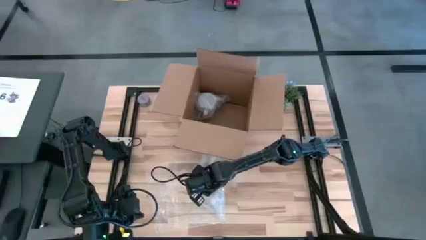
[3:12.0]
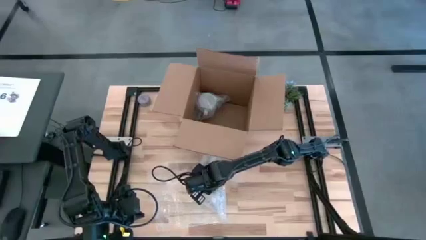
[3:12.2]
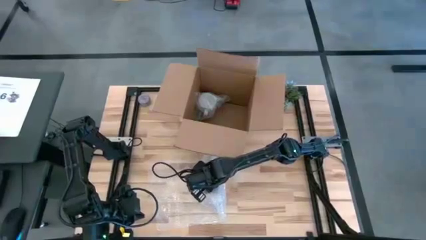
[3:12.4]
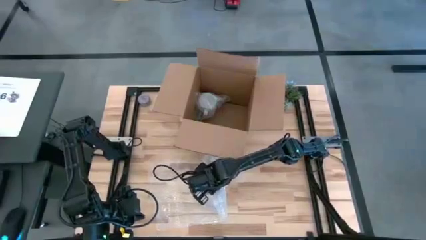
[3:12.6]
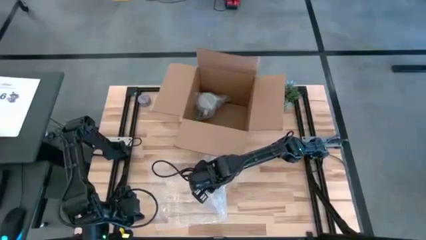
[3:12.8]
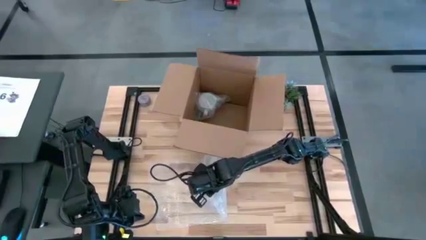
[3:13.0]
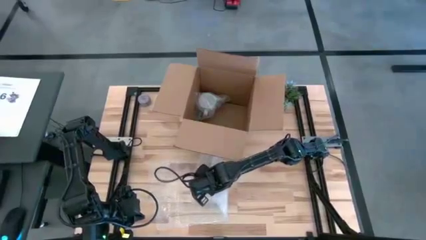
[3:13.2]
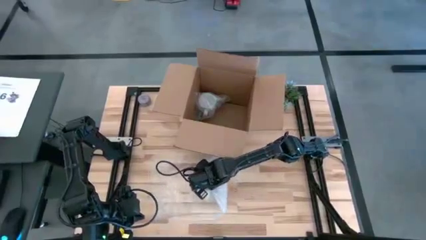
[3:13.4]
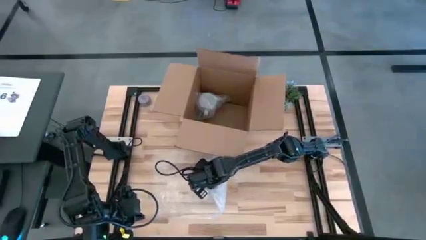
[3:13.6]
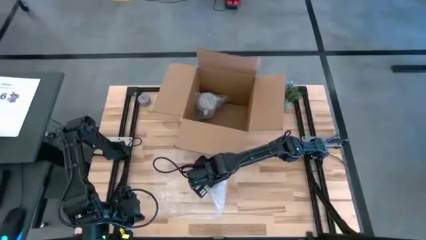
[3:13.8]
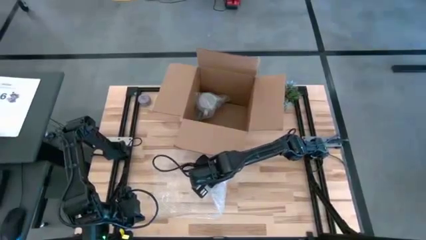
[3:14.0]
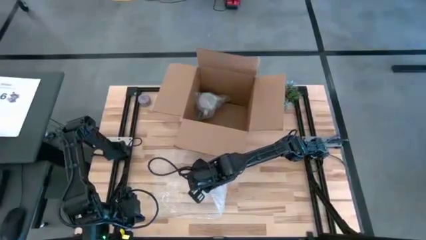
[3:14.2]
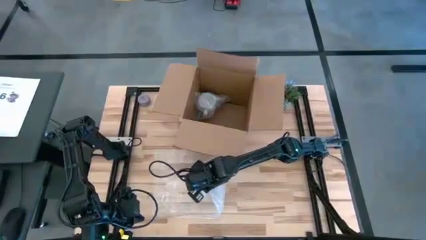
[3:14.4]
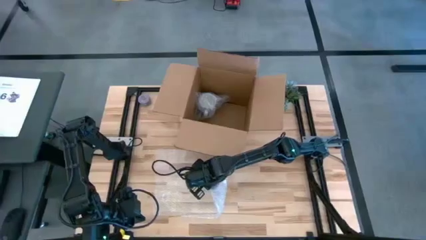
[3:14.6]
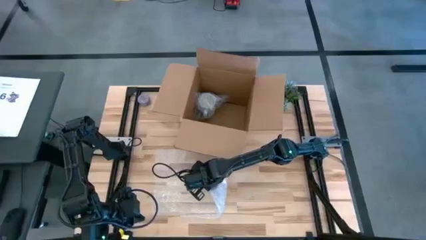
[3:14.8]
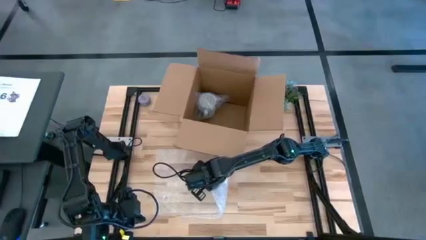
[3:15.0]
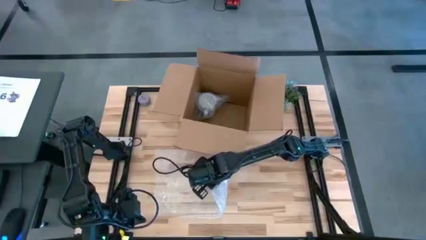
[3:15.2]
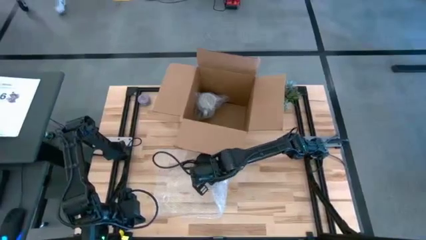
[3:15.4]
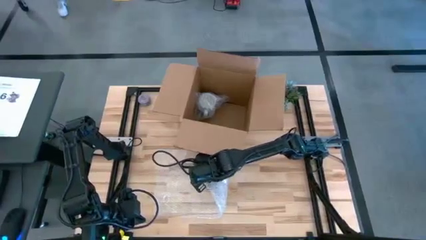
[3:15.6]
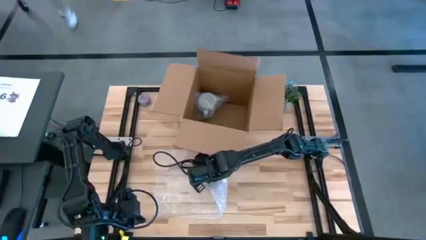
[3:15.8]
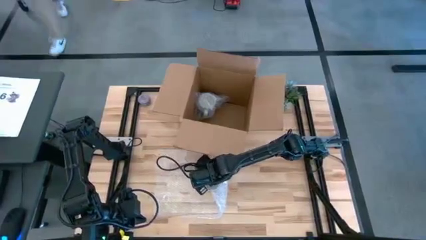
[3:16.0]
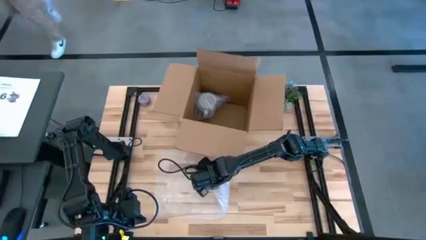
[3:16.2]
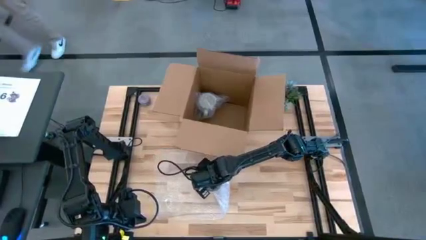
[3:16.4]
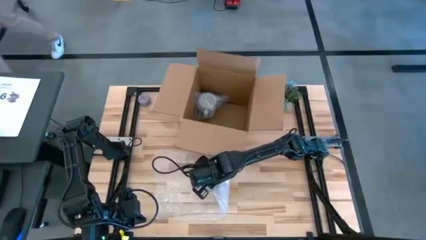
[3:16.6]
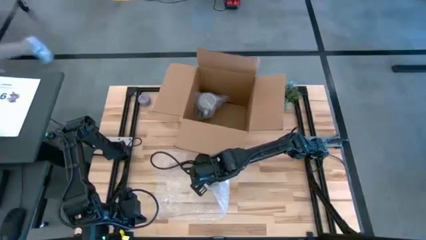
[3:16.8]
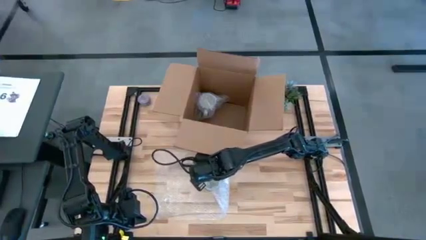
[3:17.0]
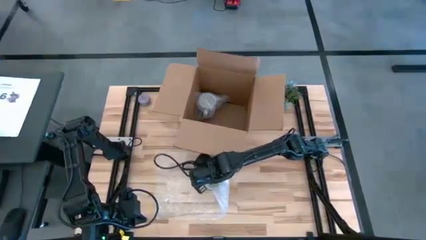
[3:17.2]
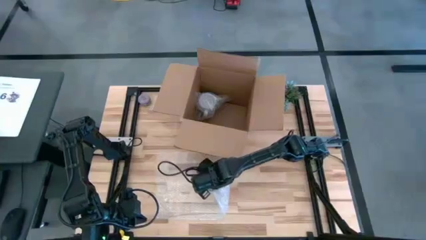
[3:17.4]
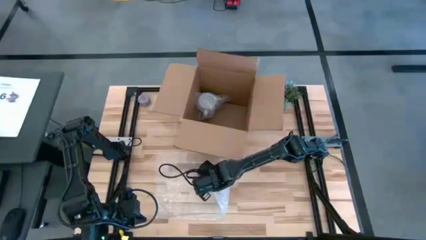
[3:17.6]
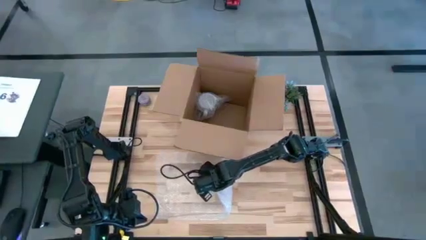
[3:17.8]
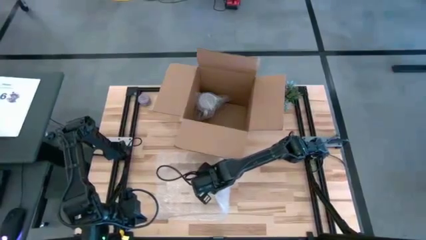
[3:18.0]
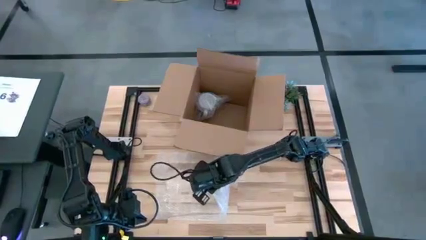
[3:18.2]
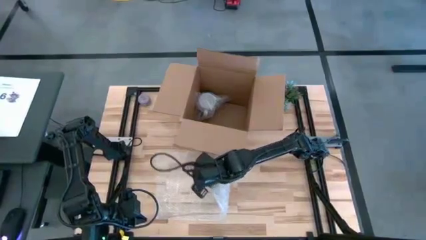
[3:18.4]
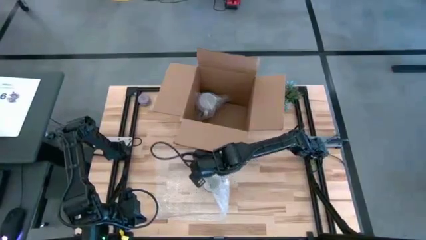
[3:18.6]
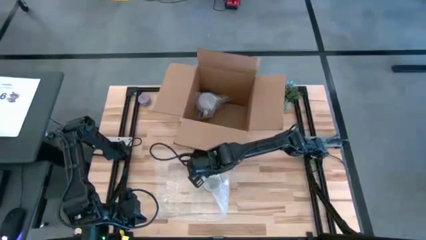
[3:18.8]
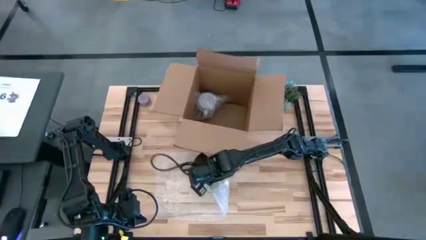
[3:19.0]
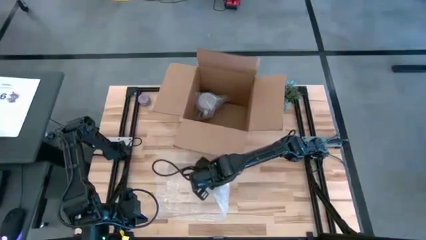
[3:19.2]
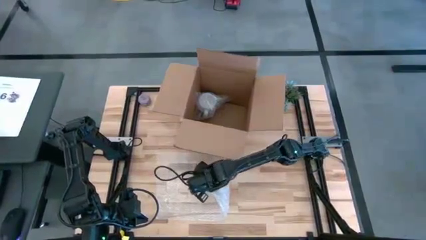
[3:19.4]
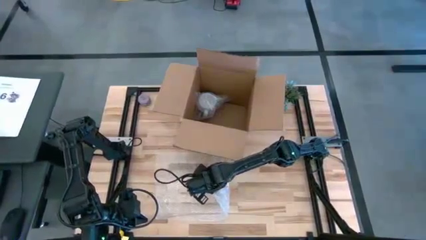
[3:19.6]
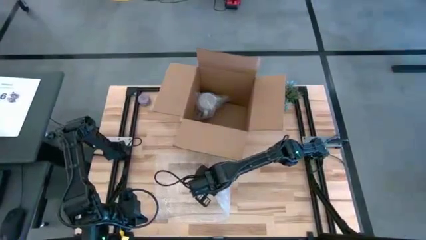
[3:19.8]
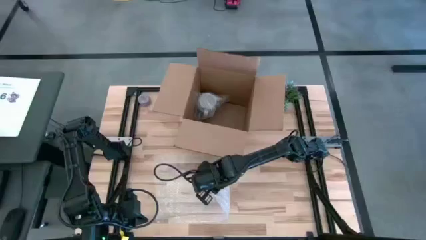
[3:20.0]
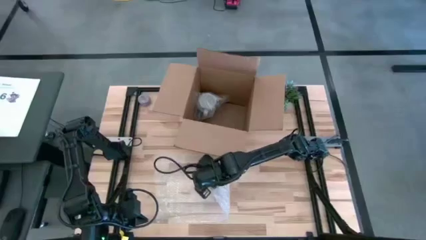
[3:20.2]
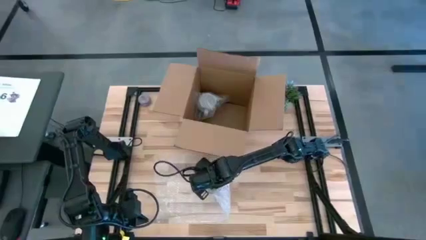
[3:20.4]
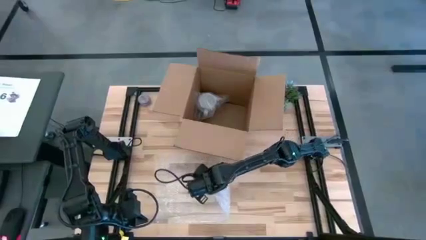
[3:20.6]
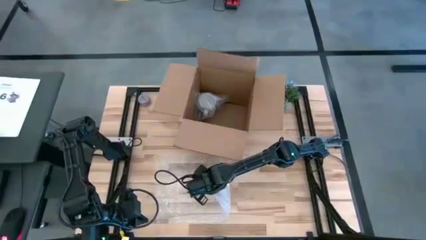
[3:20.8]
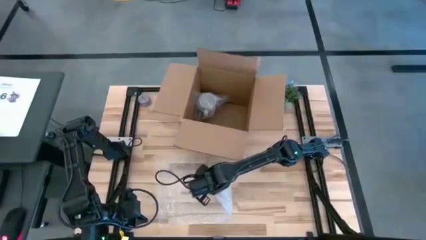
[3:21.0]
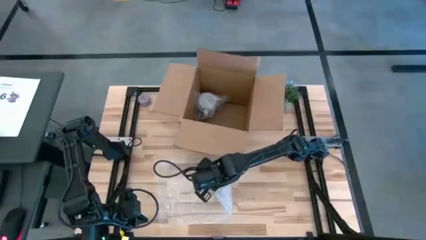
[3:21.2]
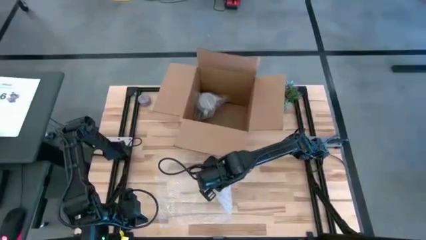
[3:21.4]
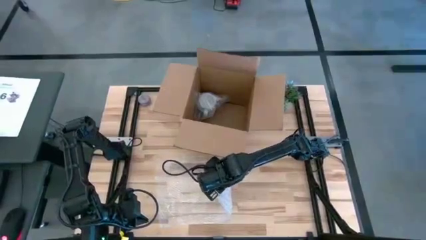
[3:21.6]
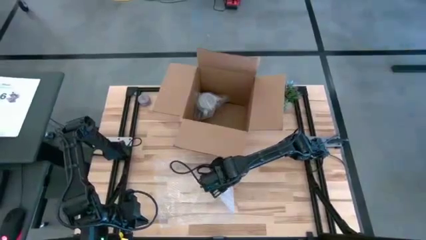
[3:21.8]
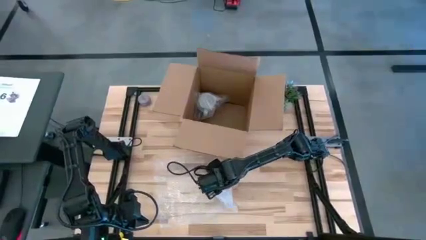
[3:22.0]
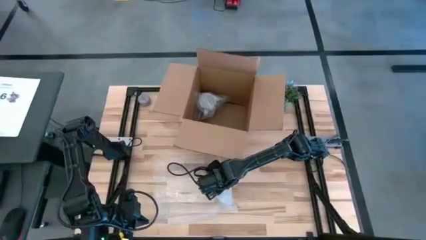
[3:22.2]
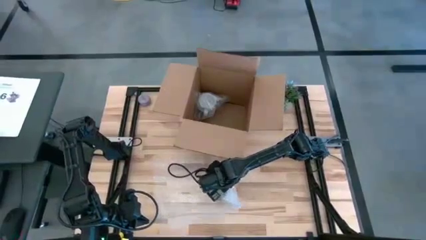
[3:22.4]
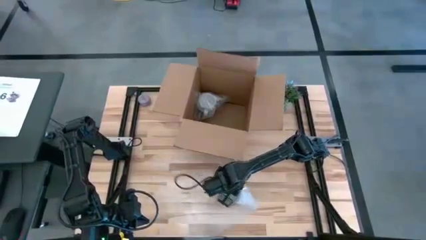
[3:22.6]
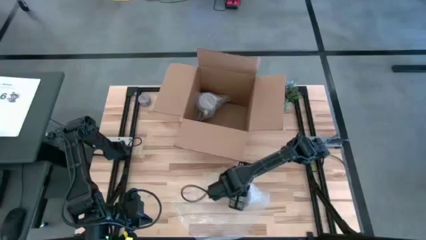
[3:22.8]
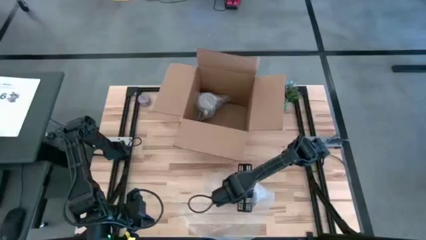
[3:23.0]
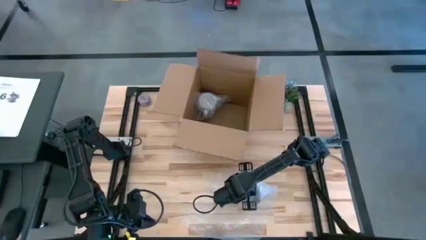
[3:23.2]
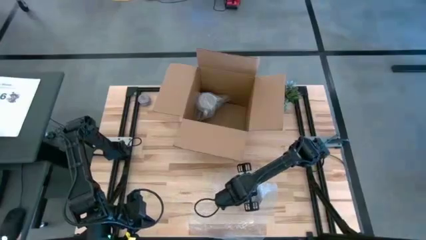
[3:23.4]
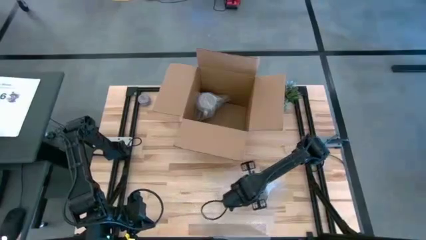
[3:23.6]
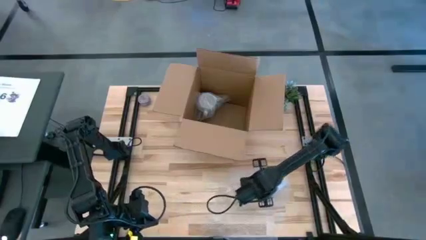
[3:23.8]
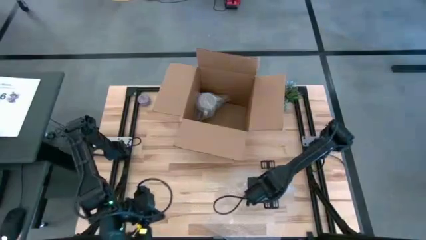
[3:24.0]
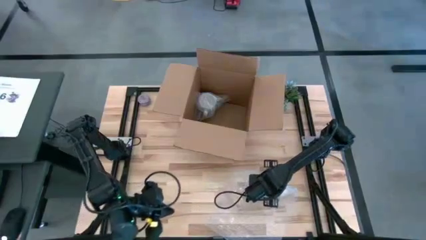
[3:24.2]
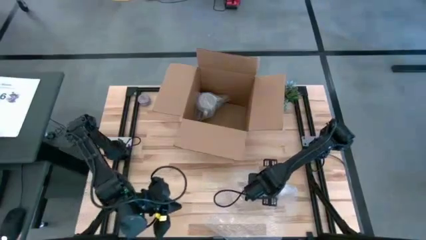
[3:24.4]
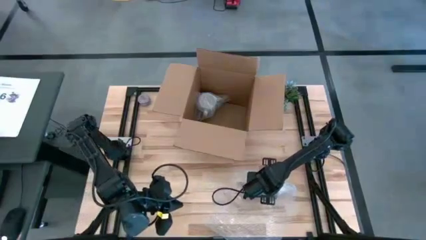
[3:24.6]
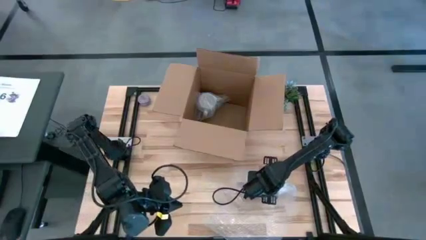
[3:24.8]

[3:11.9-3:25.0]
Task: wrap mug
Wrap the white blue mug with the transparent bubble wrap

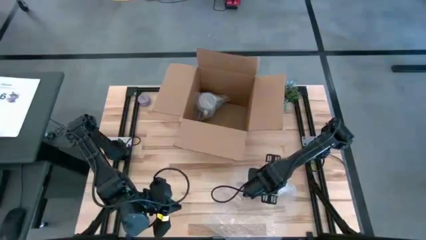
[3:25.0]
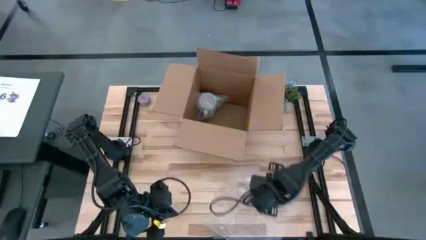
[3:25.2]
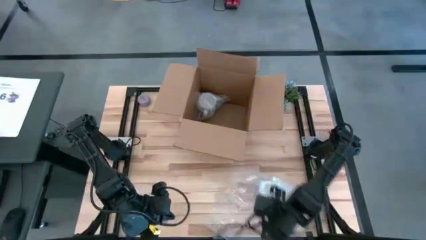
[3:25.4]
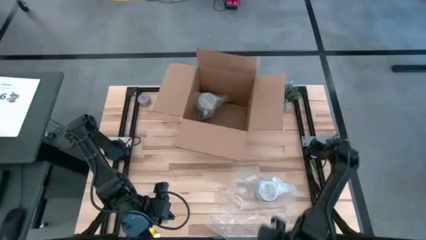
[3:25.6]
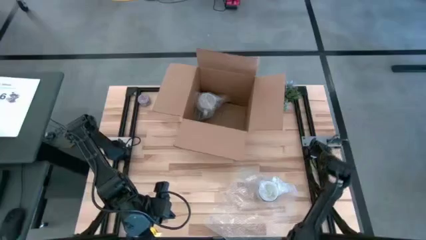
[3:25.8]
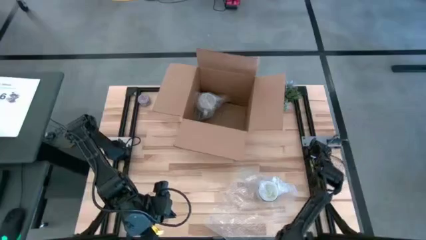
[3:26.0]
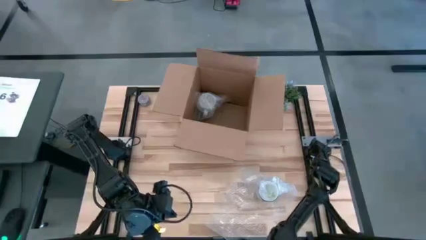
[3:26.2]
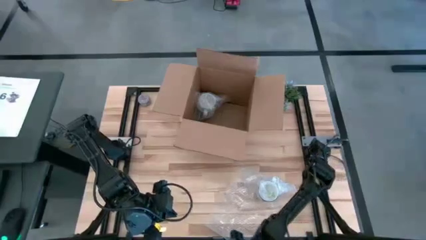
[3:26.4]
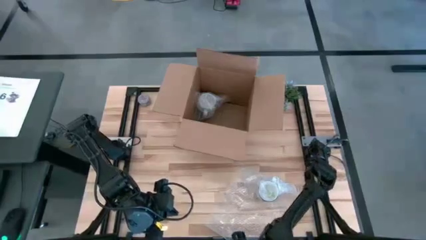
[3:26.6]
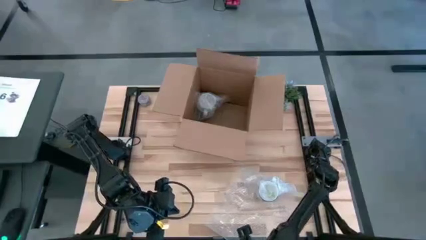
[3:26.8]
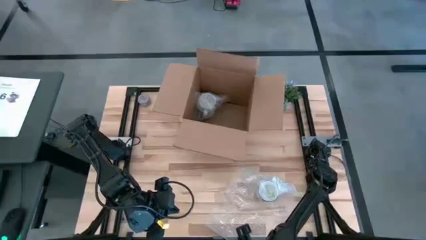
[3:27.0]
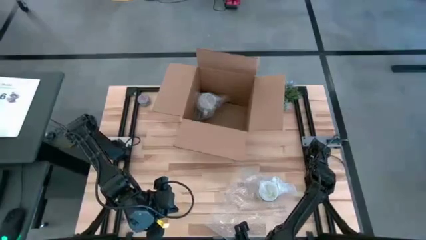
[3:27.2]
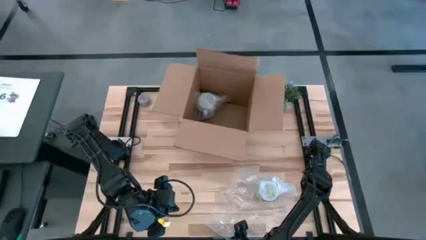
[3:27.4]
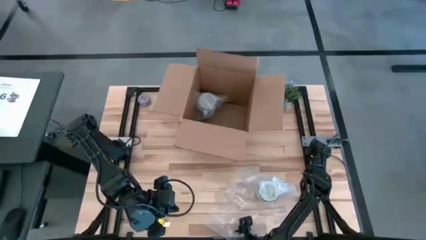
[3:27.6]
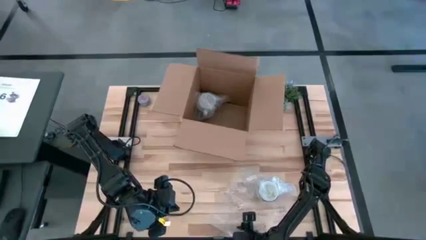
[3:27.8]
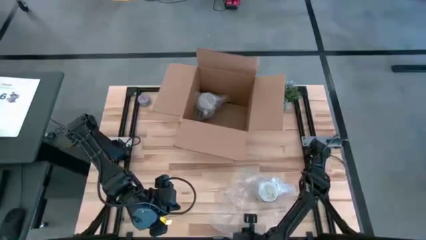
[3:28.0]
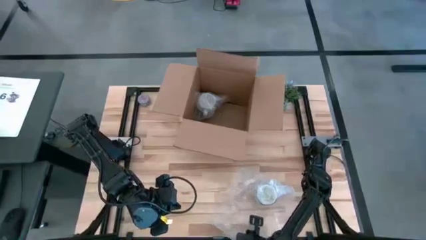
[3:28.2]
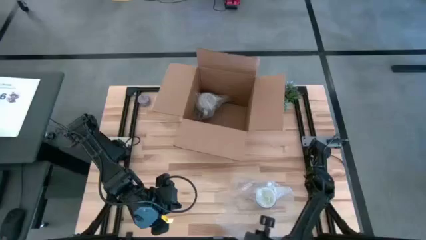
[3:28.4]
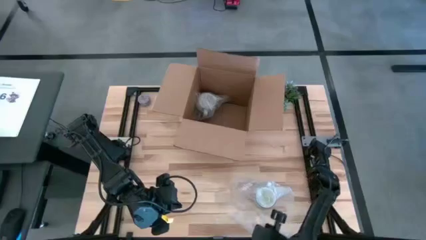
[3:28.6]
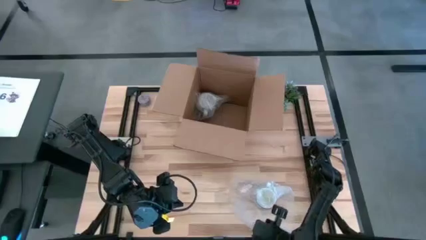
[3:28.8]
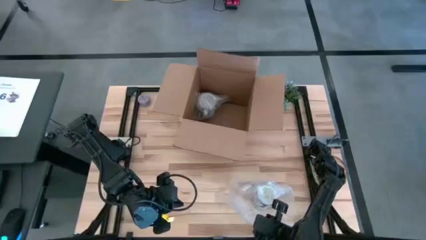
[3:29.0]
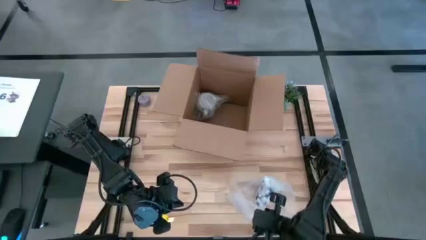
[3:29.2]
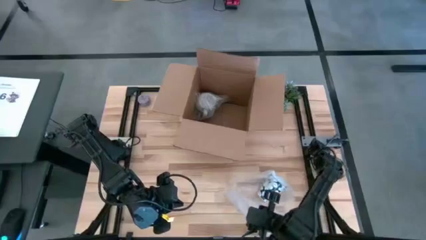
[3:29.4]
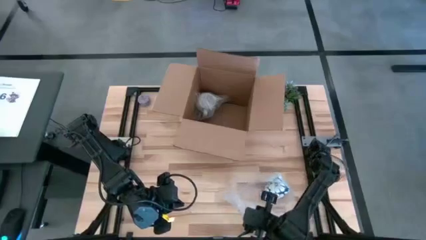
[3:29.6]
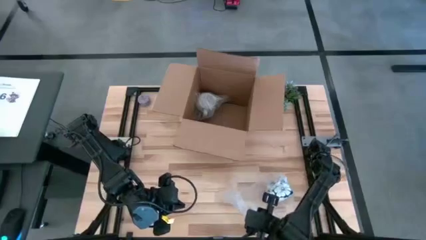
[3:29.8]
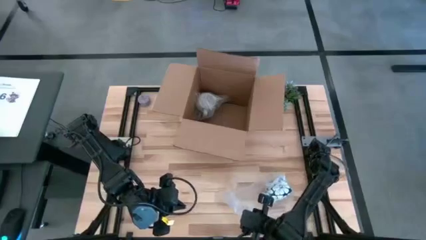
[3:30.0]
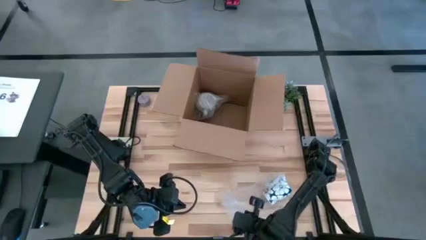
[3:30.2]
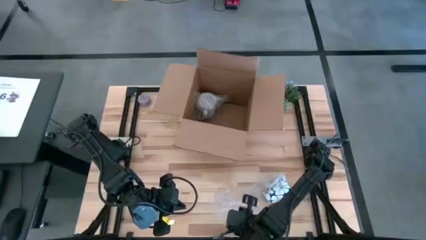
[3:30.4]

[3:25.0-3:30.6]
Wrap the white blue mug with the transparent bubble wrap
